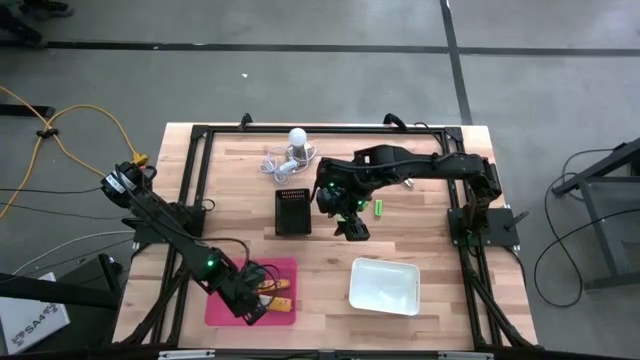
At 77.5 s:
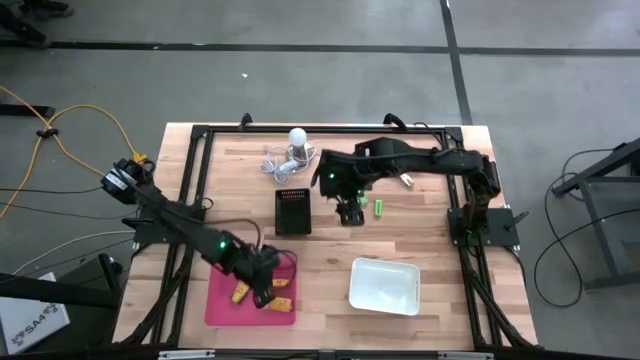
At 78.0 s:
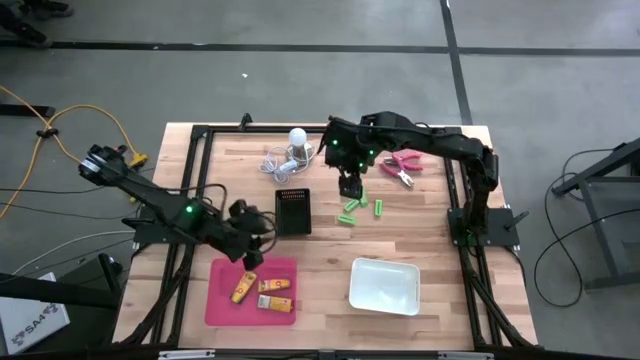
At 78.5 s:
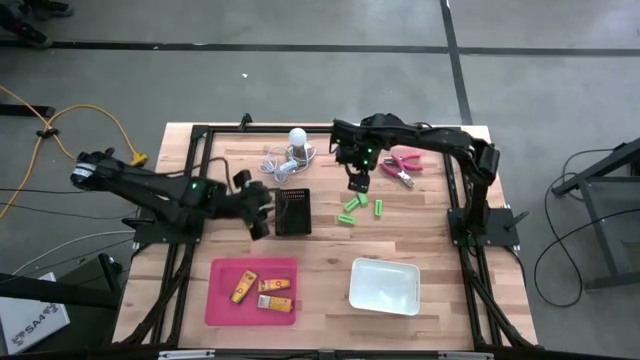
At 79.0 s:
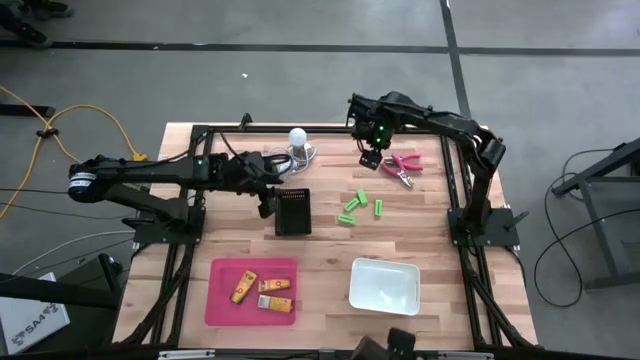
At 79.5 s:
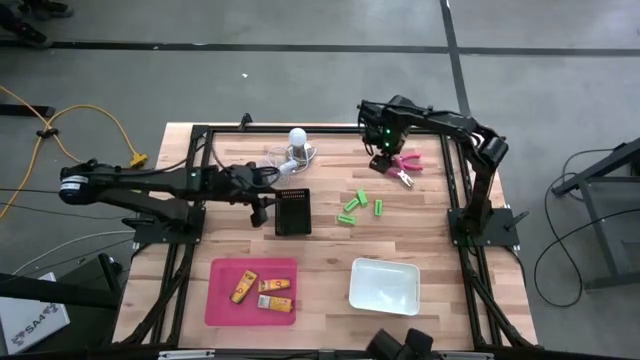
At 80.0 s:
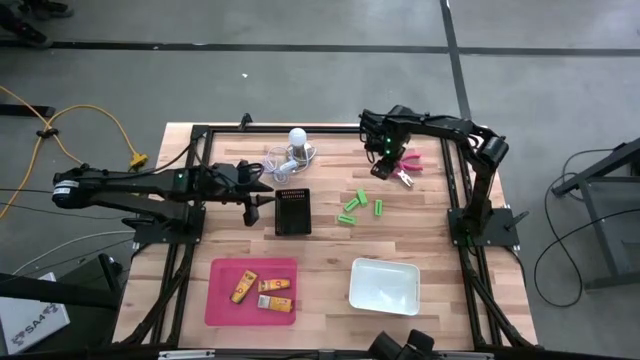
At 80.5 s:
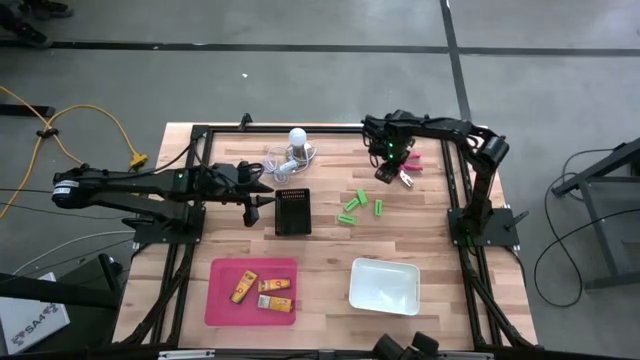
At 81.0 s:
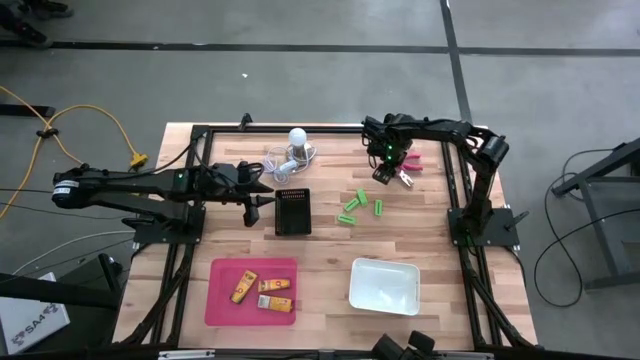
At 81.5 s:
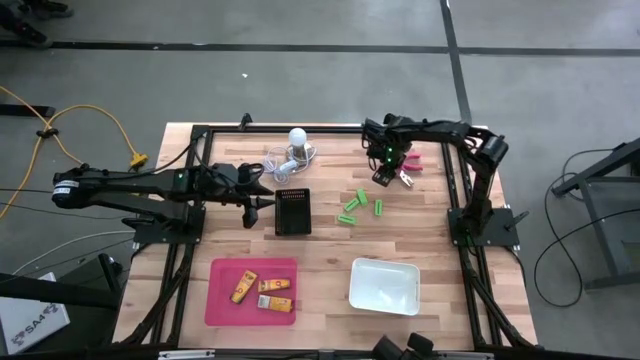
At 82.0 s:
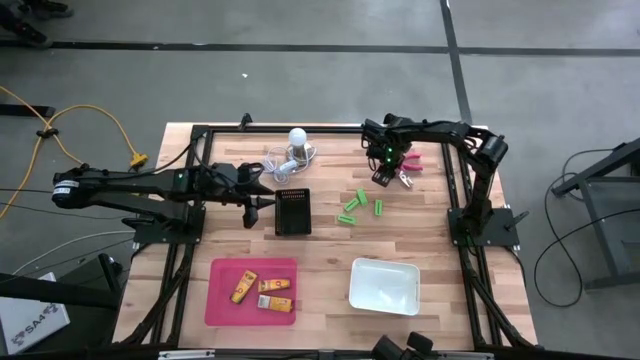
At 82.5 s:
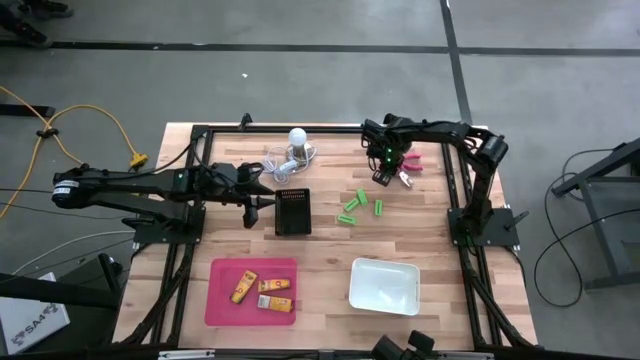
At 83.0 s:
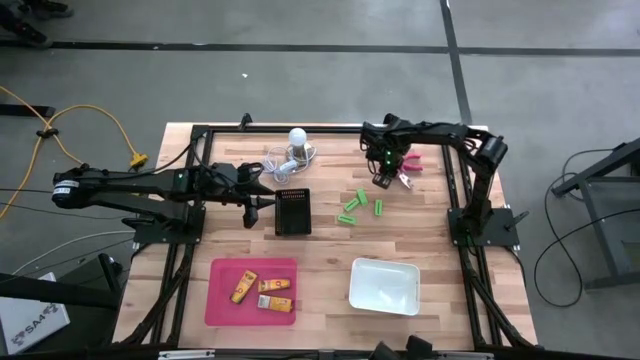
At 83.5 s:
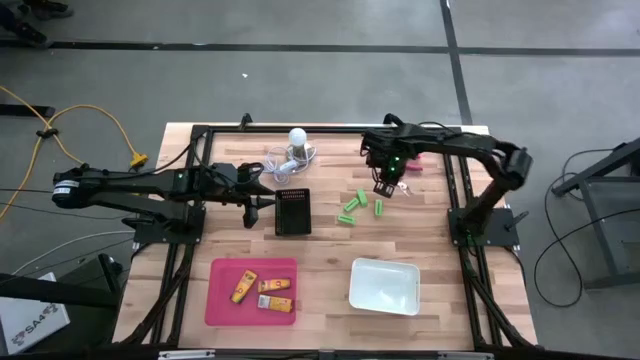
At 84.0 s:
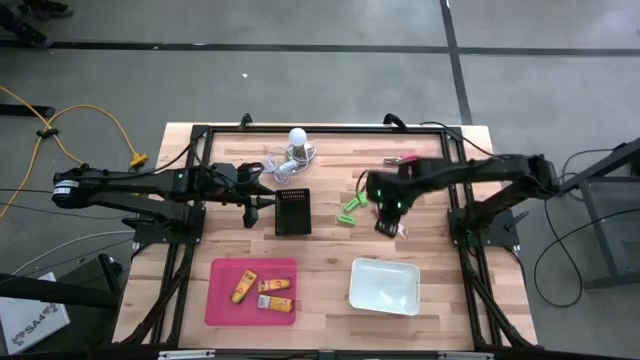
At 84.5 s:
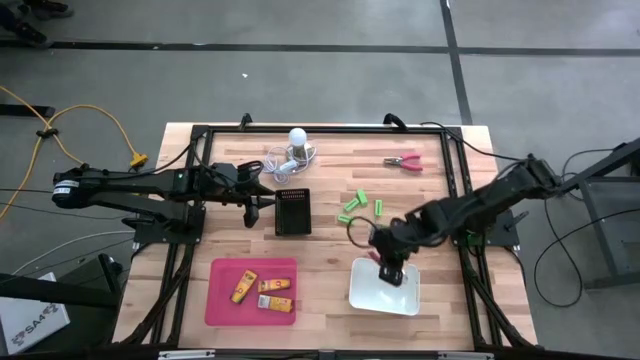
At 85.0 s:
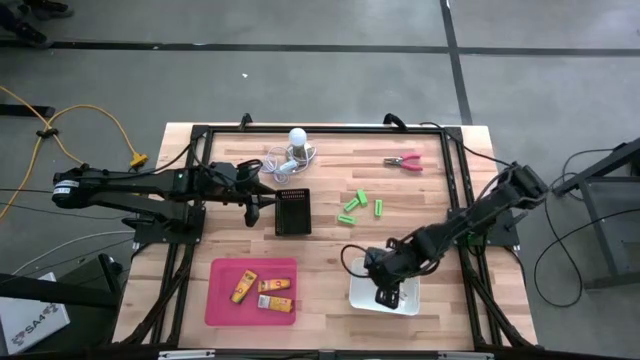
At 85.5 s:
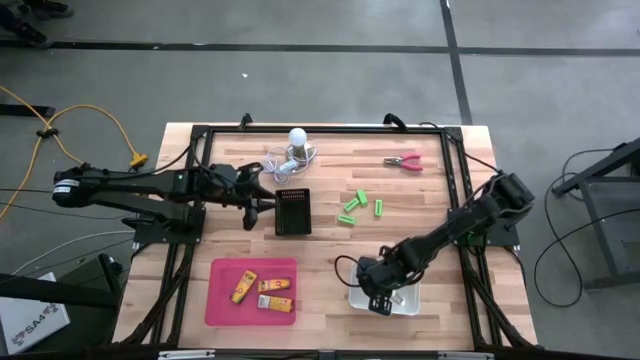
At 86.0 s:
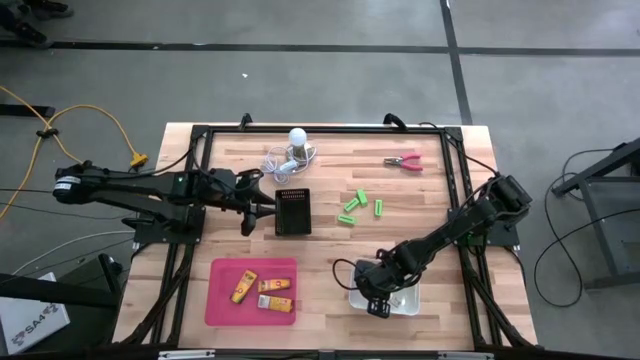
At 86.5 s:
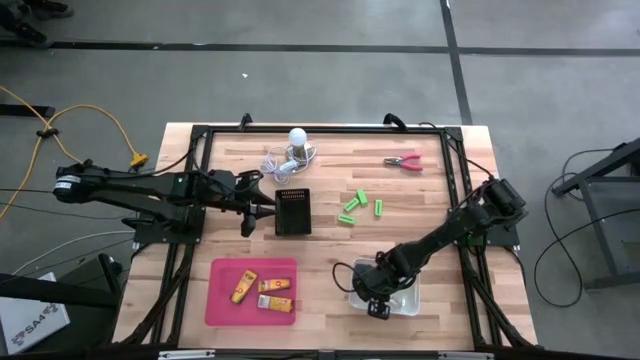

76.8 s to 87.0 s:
Task: Pick & Place School Supplies
Put the pink hole puncher into the white bin

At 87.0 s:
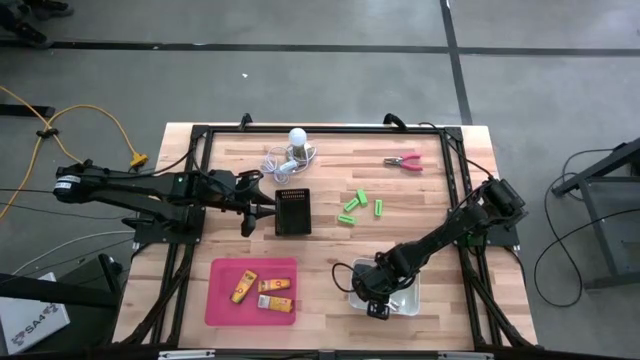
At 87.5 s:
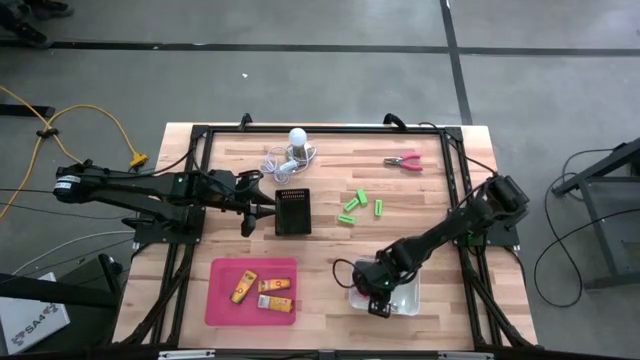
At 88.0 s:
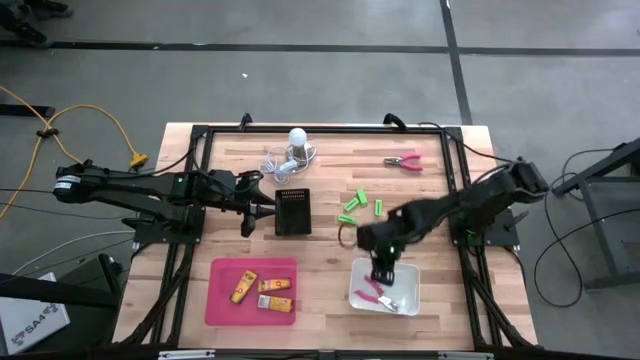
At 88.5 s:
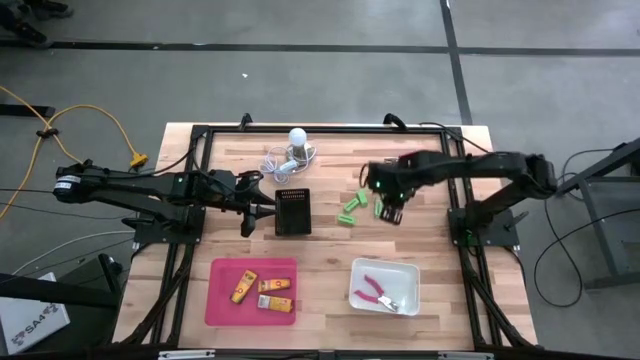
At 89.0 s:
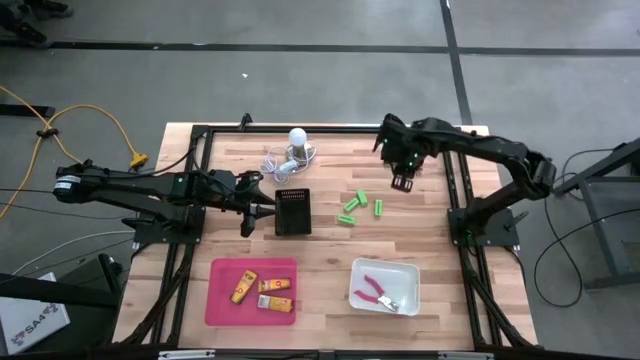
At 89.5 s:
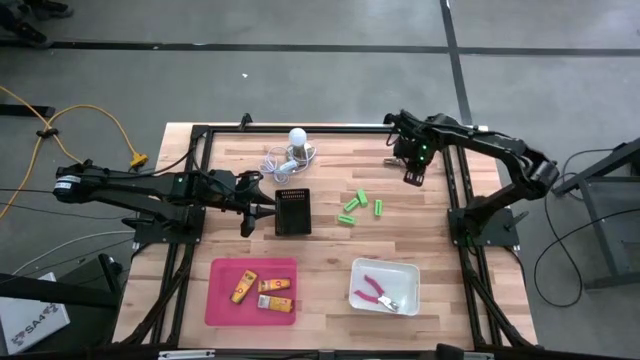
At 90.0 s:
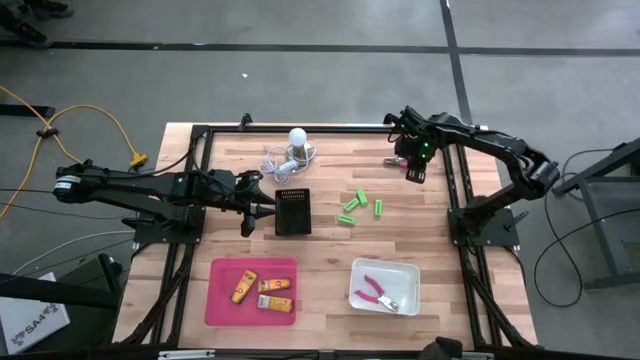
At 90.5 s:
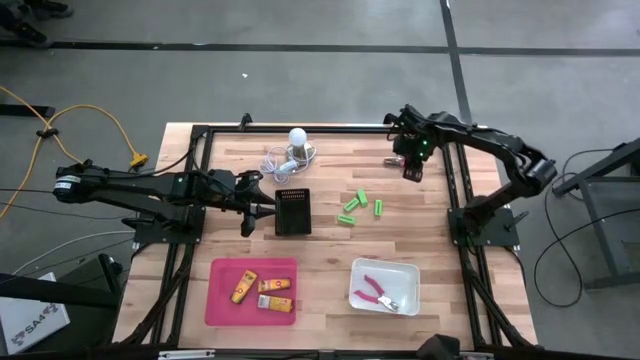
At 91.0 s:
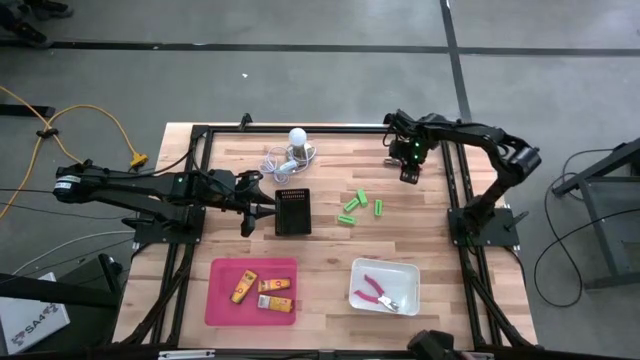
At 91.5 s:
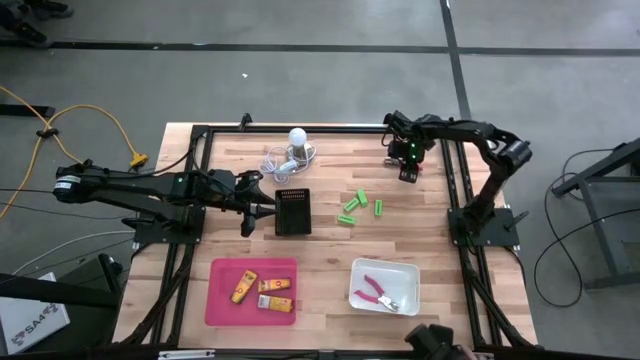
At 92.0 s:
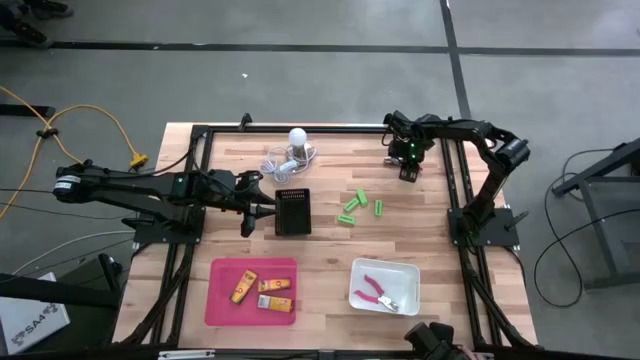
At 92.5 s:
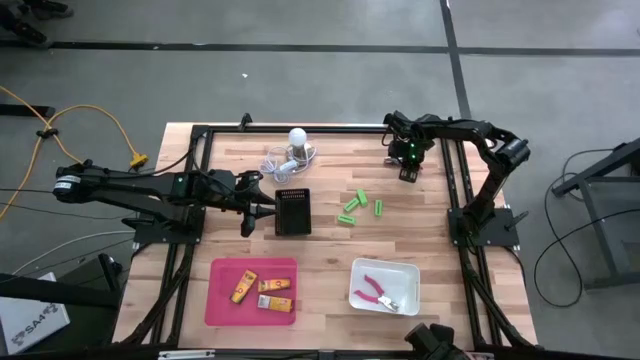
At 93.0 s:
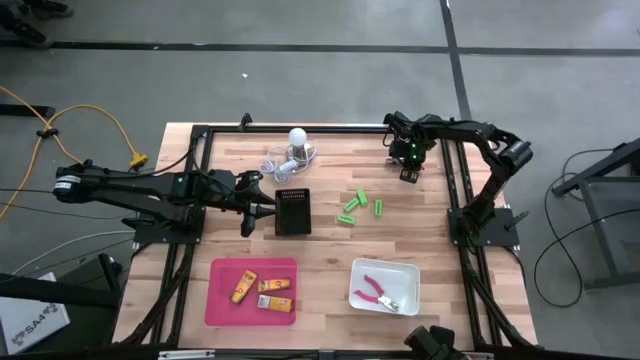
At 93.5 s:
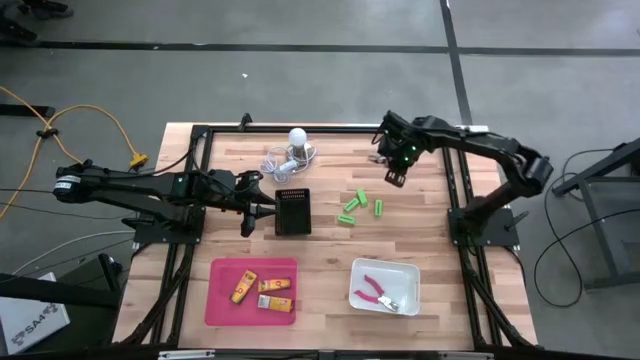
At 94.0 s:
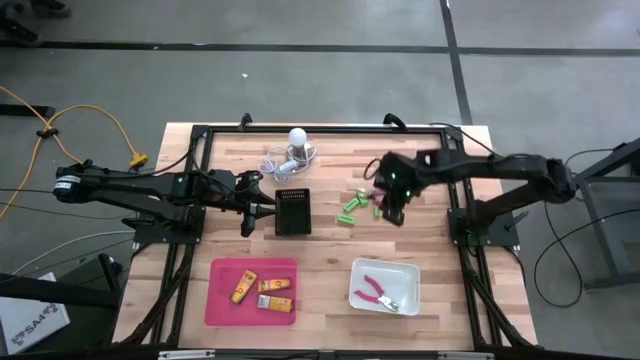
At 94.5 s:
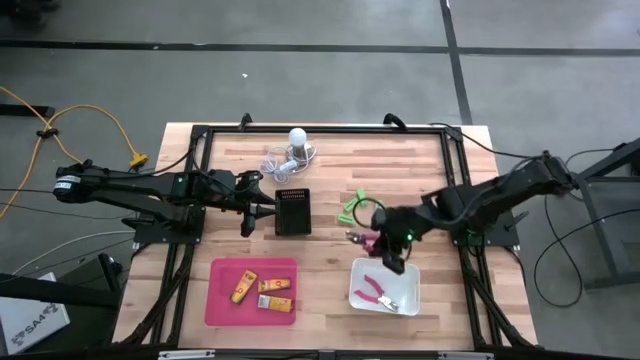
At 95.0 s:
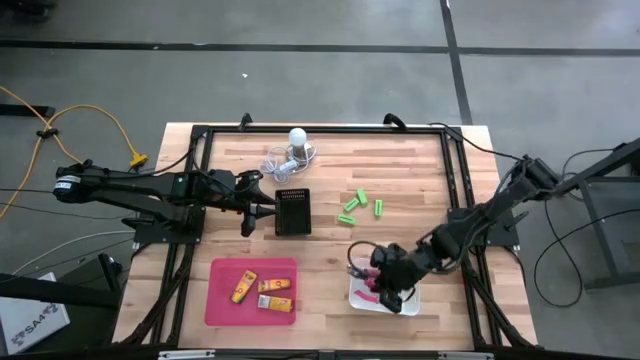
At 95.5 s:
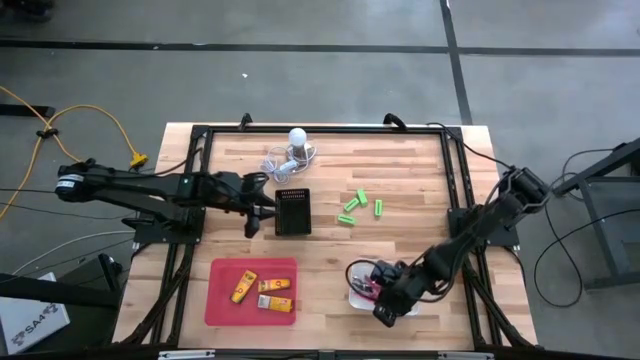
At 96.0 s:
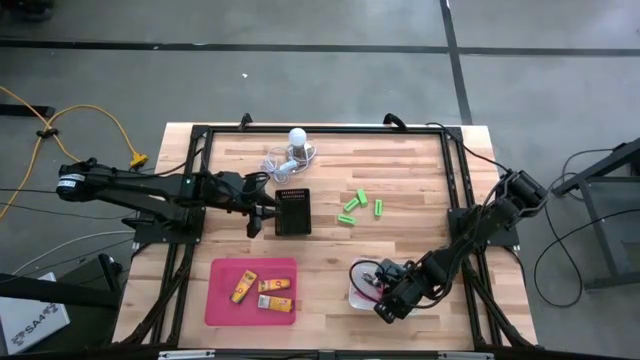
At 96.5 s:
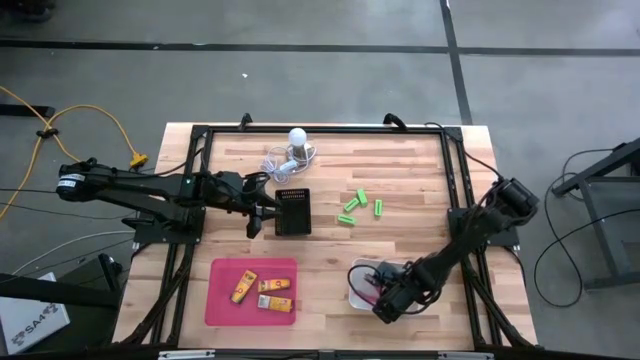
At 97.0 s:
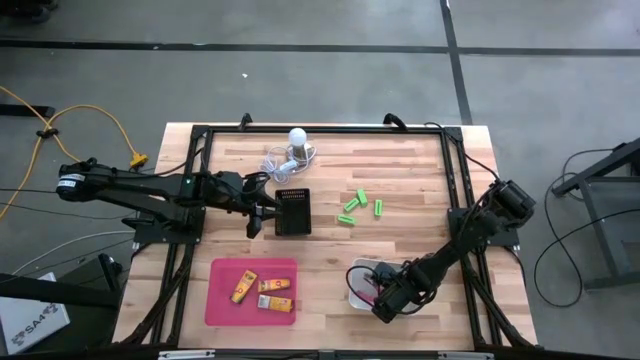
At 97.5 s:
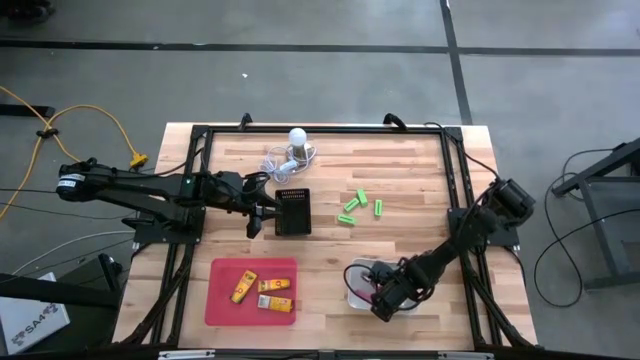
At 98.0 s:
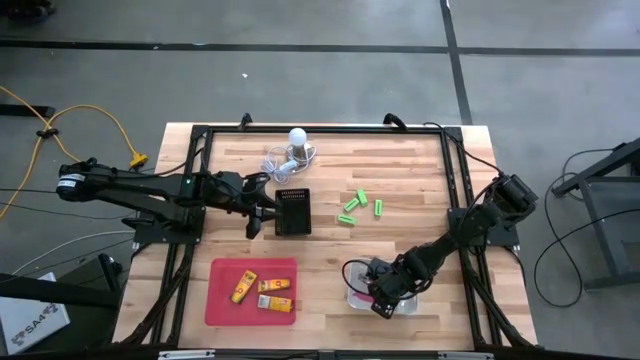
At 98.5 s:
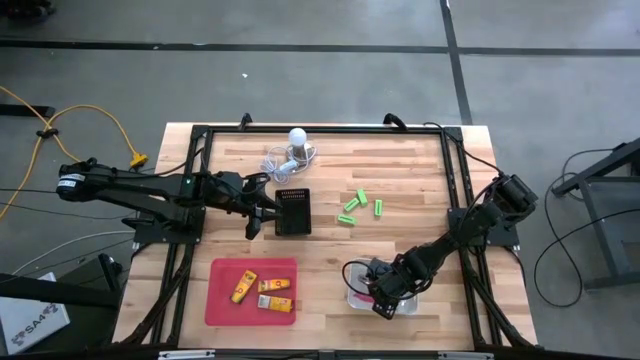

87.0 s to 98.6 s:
Put the pink hole puncher into the white bin
